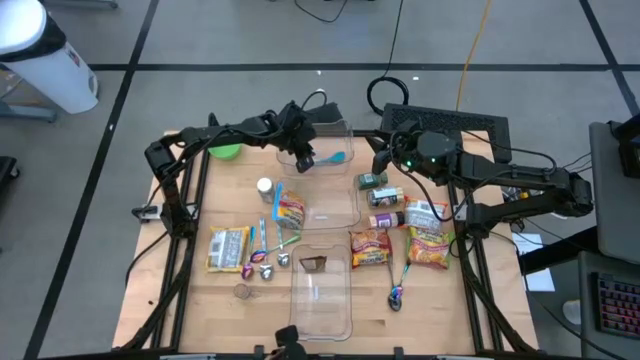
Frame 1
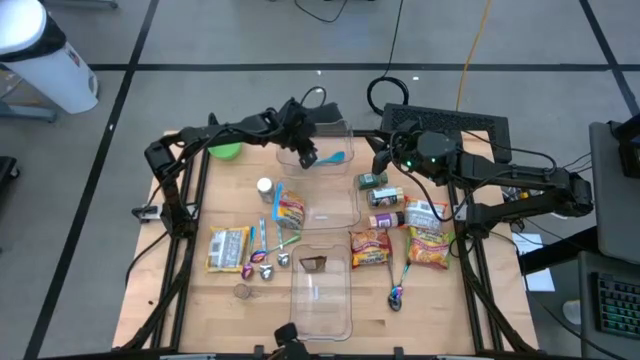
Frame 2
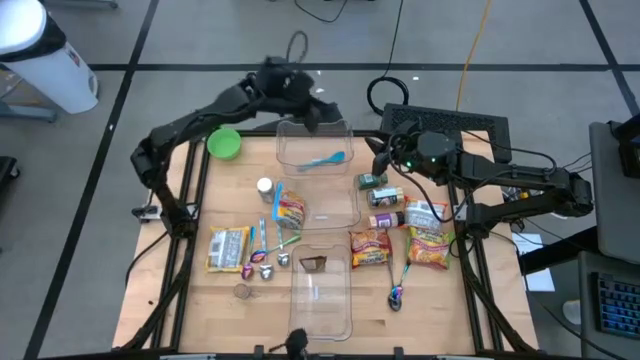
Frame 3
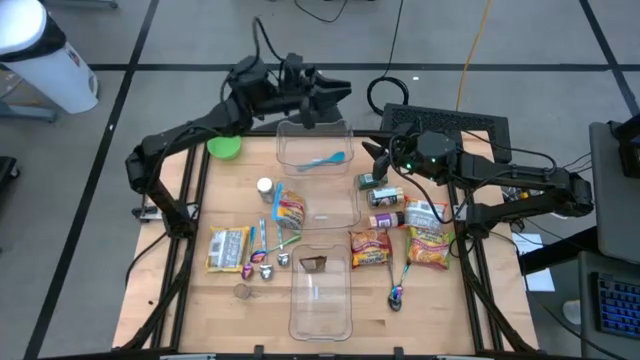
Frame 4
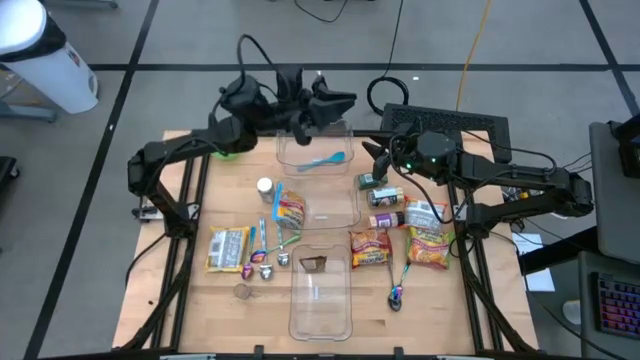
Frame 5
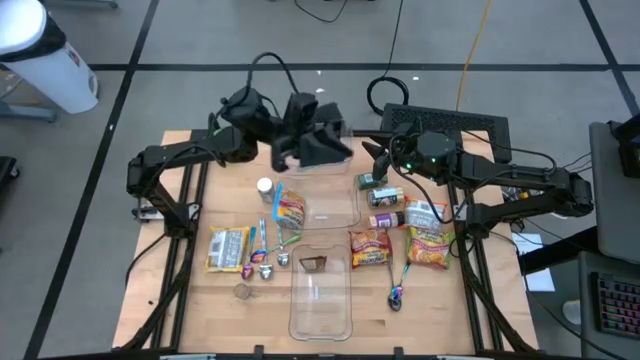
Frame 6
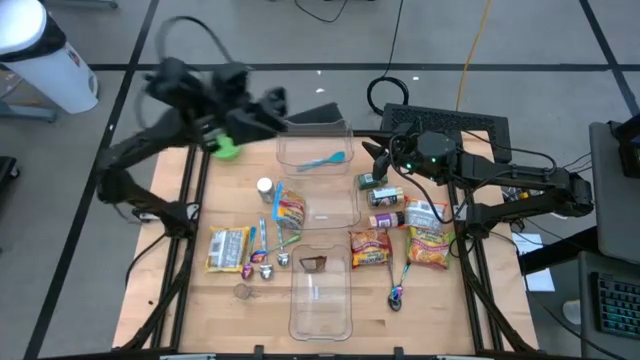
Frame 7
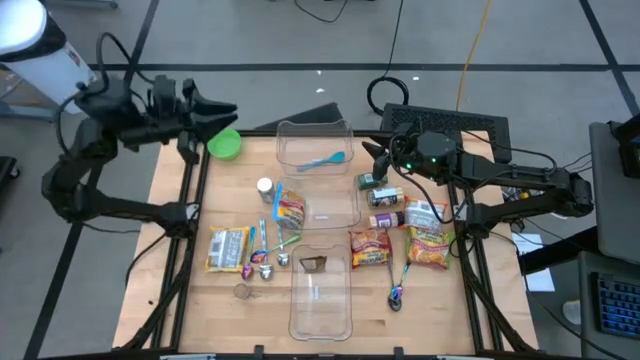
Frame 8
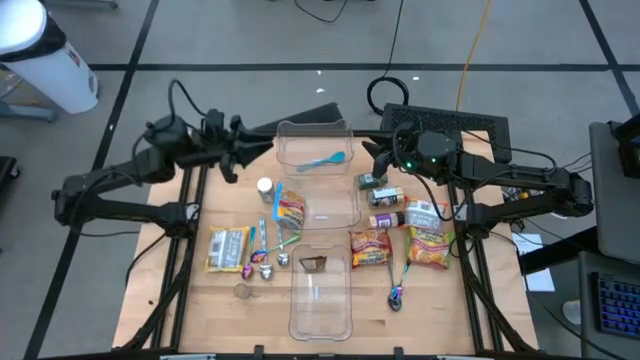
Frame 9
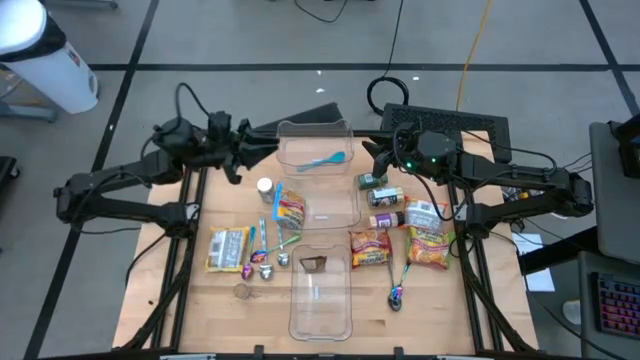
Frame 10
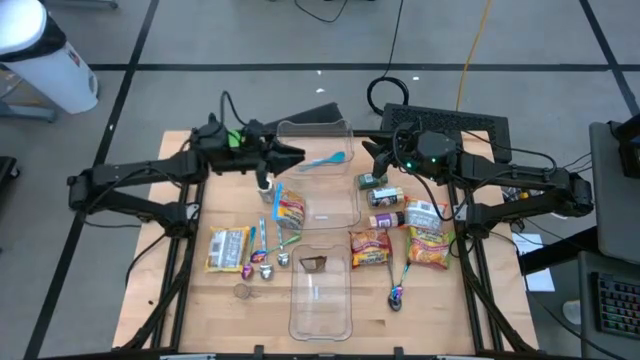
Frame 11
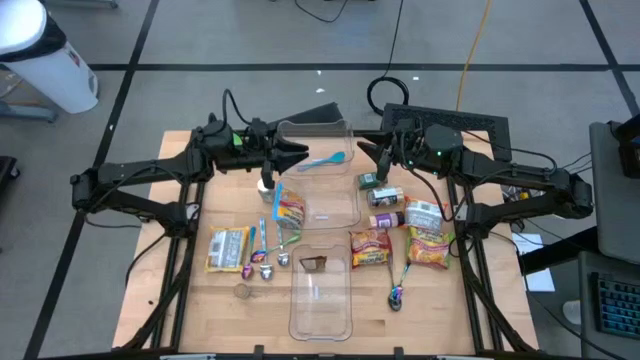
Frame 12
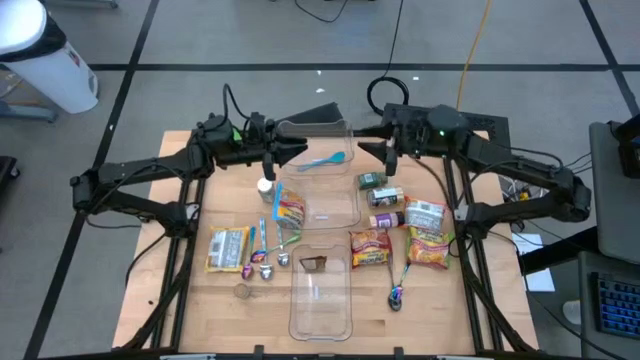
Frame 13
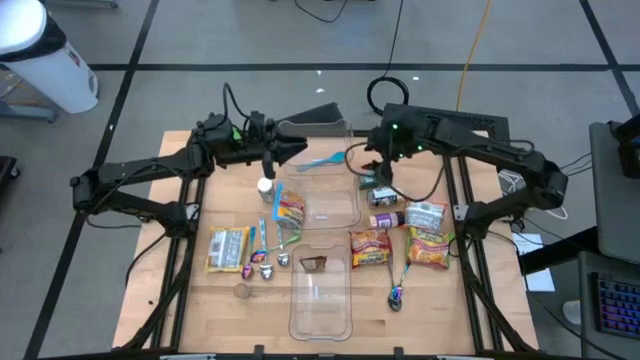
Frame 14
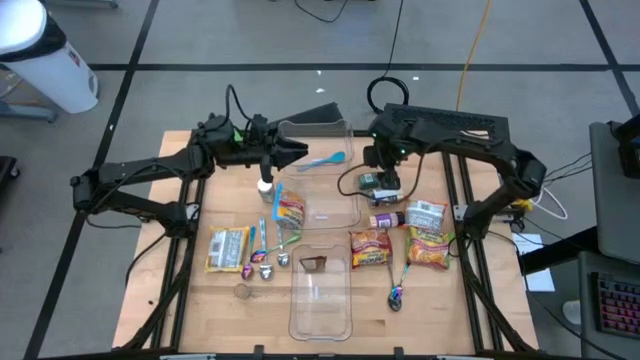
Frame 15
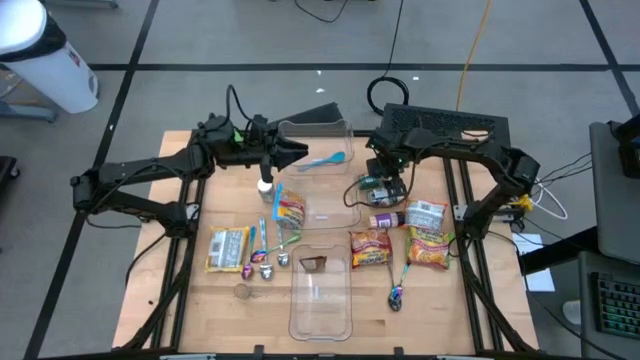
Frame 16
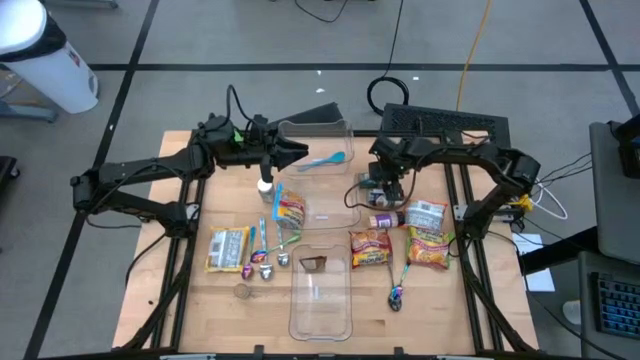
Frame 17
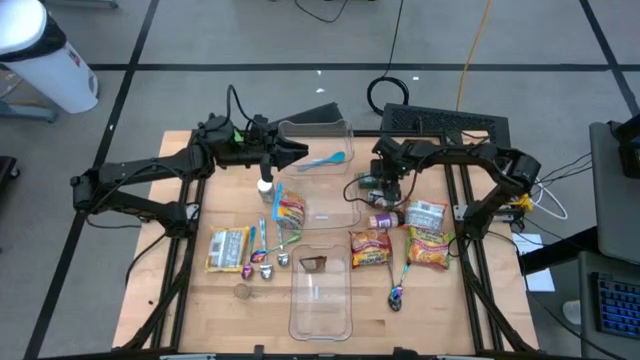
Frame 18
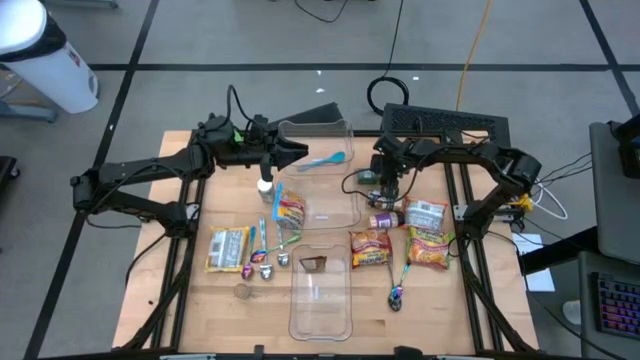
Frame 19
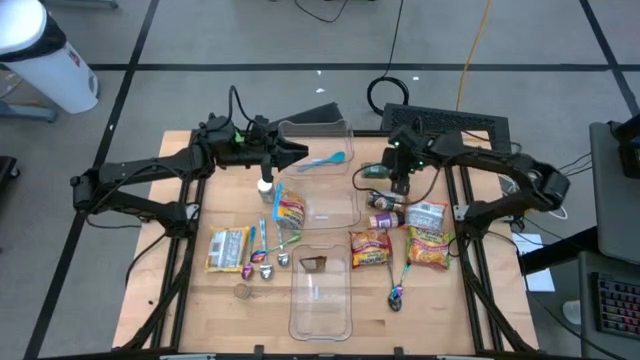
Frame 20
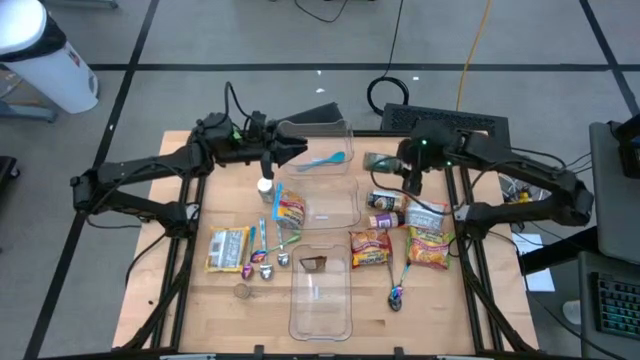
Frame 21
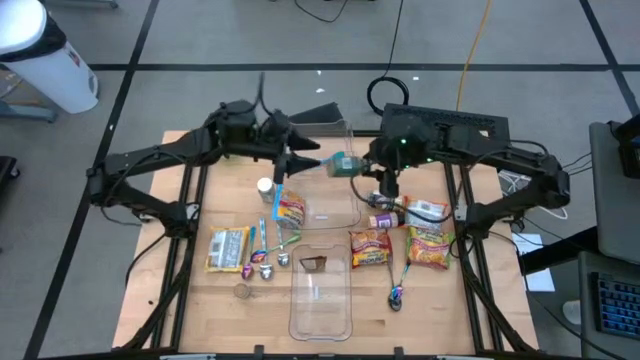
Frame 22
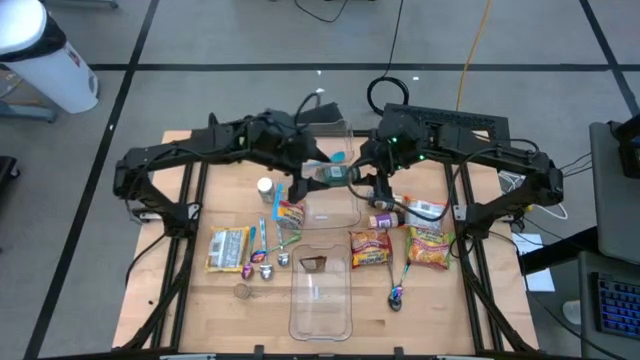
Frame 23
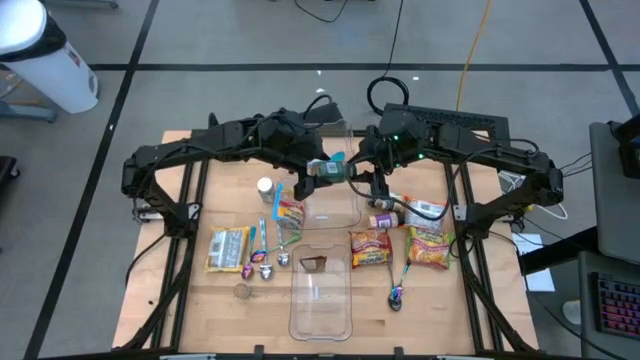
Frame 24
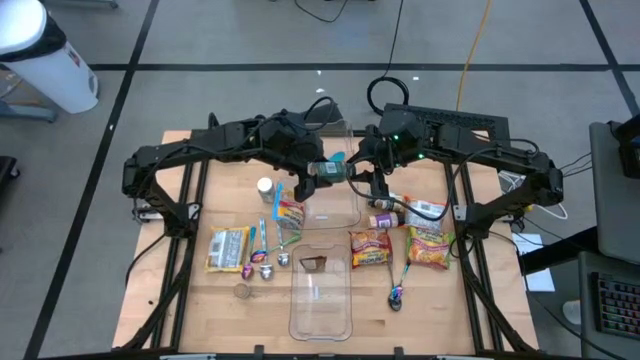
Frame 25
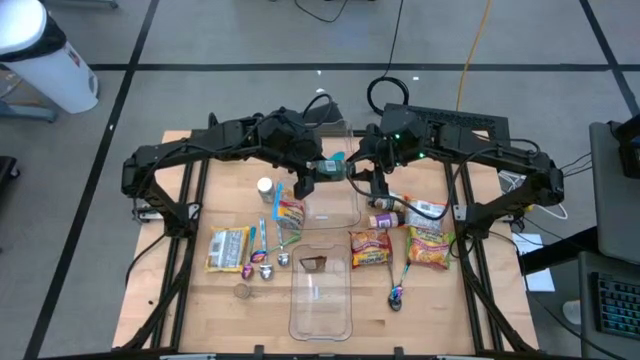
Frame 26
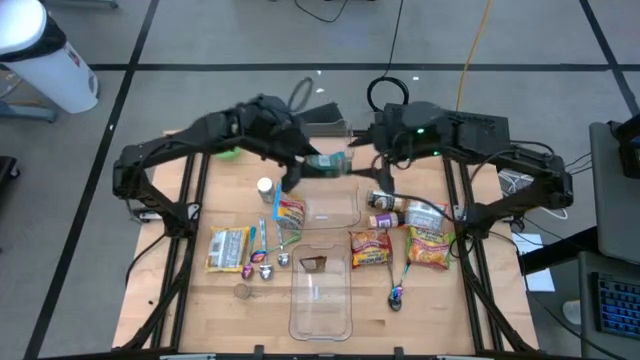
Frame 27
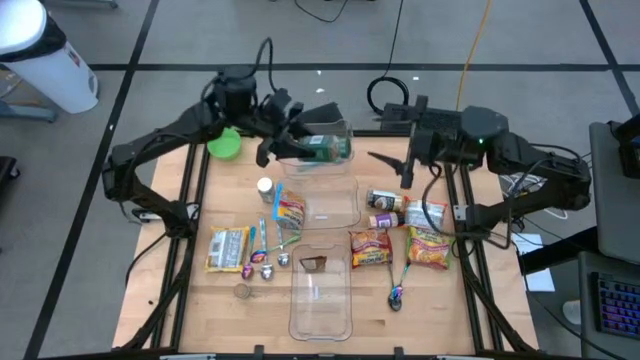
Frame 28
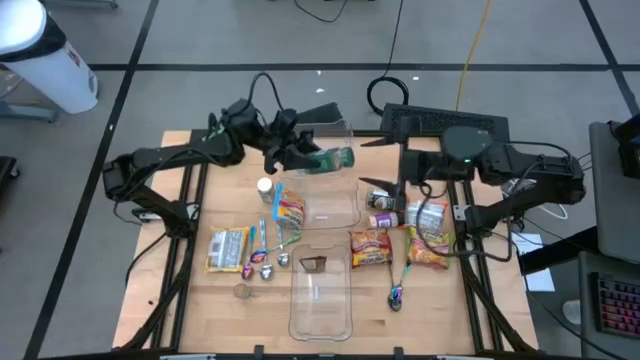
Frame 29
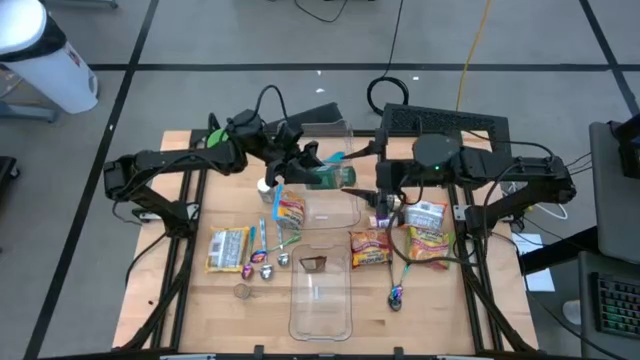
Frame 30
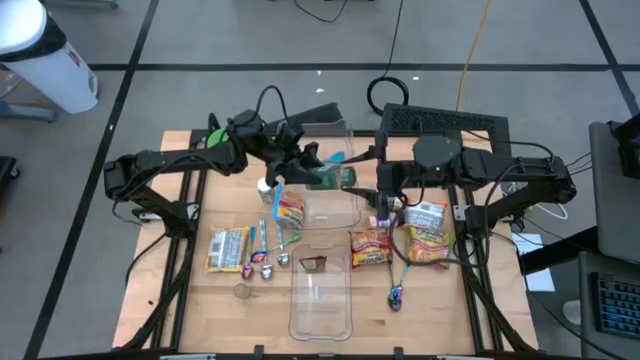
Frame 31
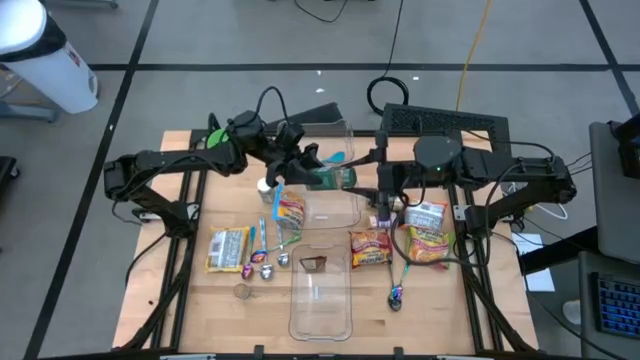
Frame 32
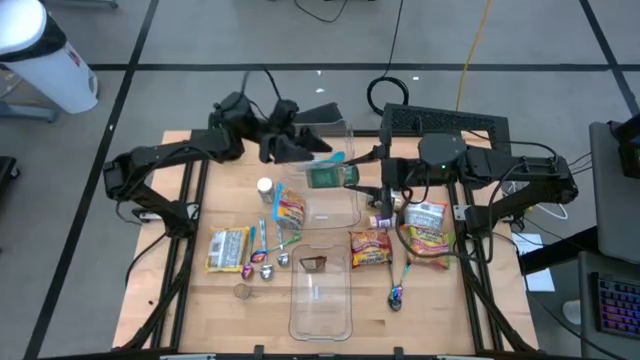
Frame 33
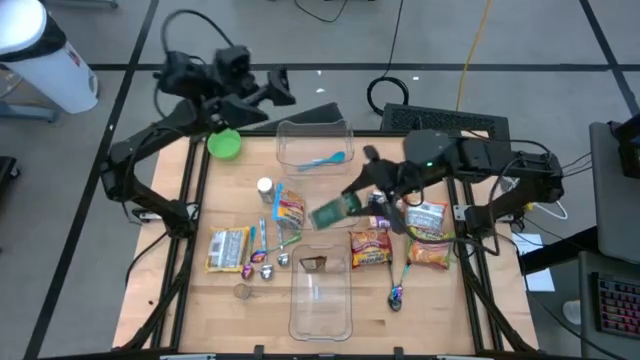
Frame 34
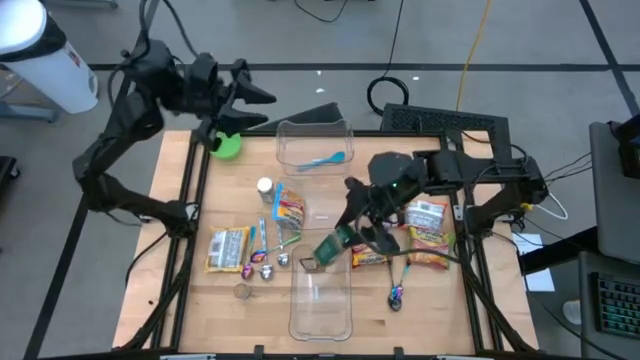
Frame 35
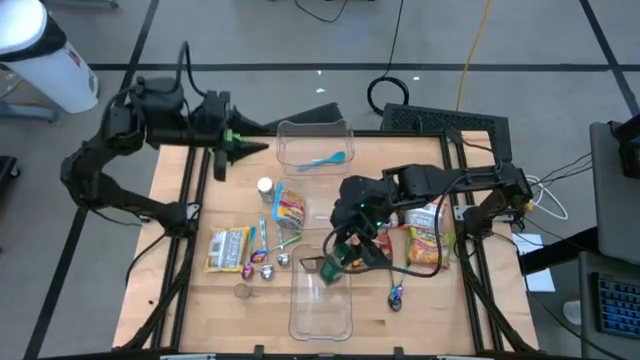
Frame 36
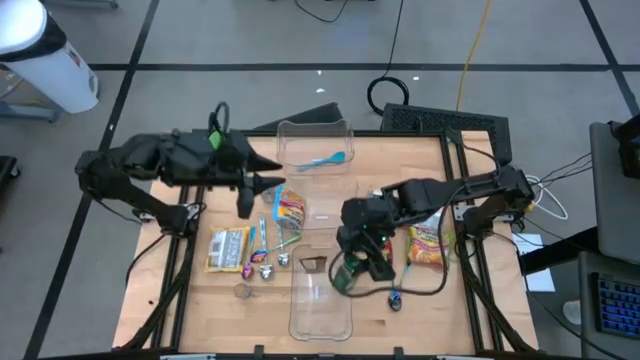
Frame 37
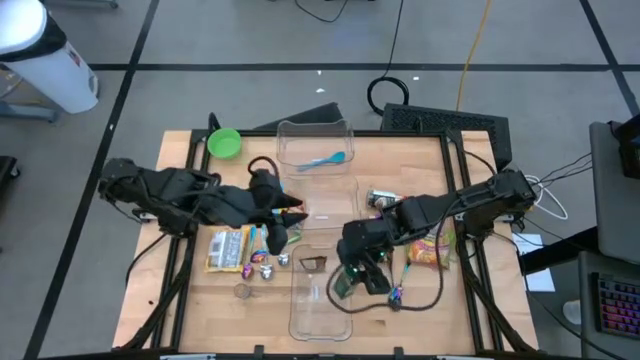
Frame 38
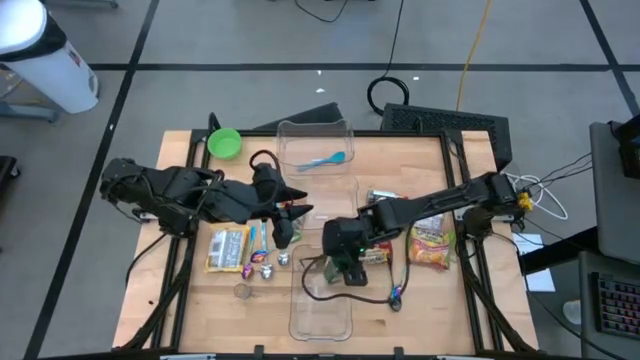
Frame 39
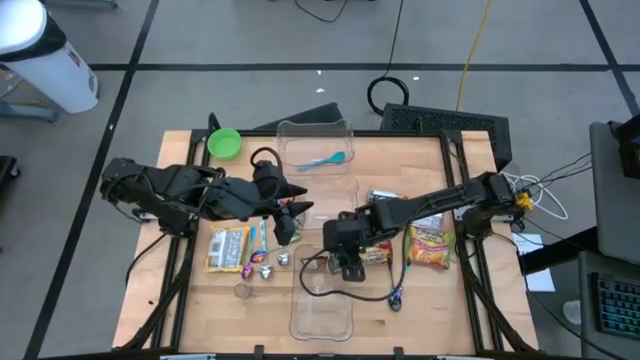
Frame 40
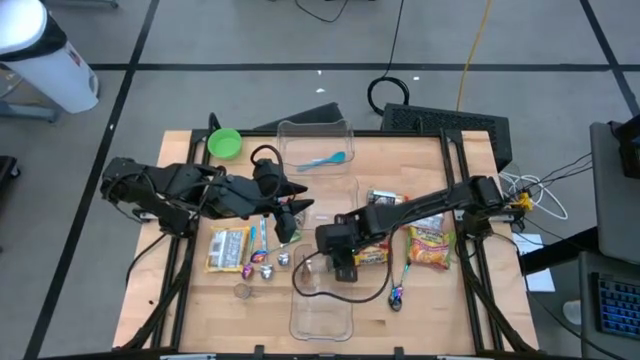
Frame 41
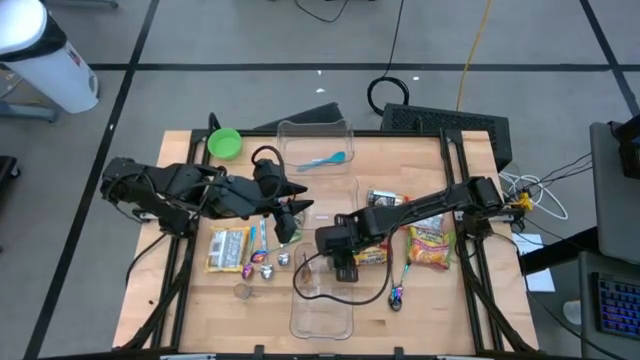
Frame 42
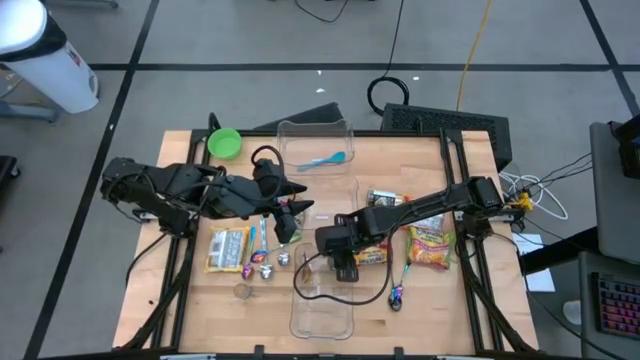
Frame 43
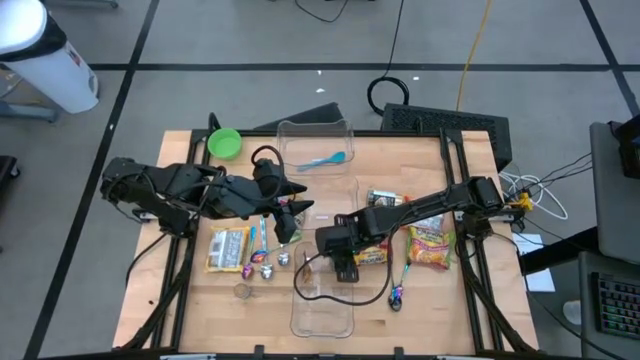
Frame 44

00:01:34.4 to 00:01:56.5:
Task: Pick & Place Food Item
Put the green seasoning bottle into the bottom transparent bin
